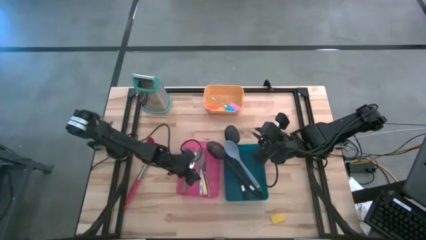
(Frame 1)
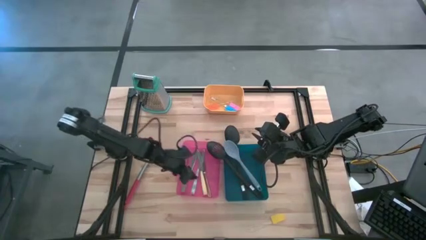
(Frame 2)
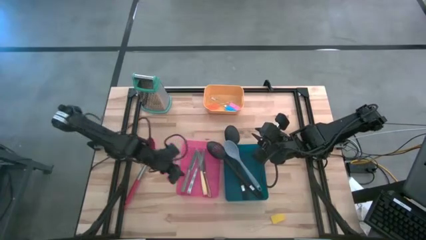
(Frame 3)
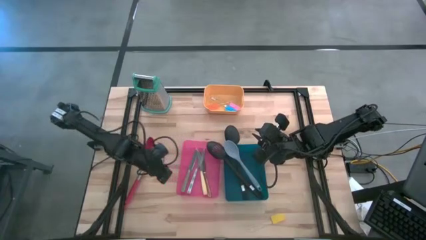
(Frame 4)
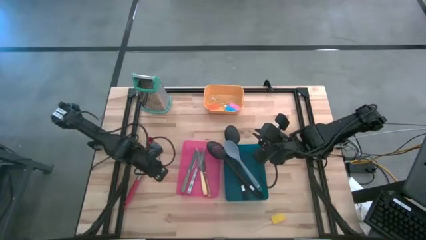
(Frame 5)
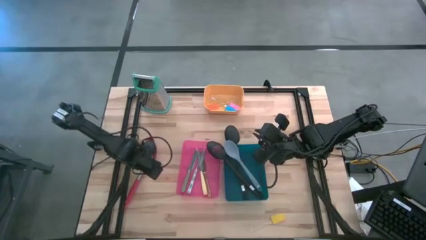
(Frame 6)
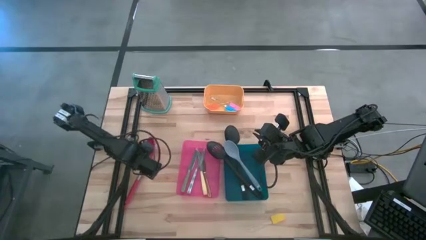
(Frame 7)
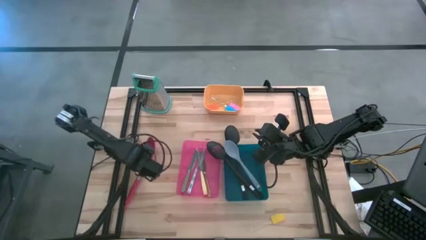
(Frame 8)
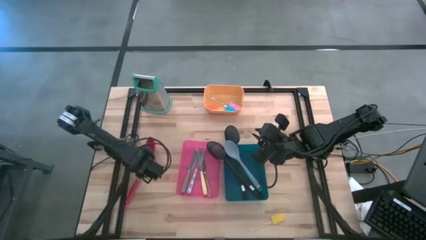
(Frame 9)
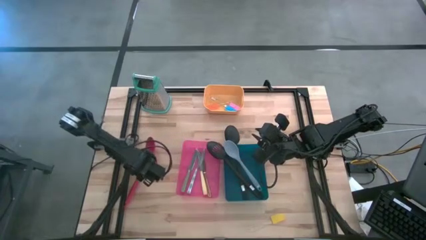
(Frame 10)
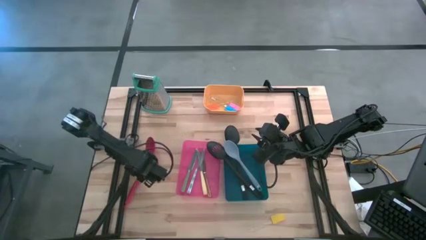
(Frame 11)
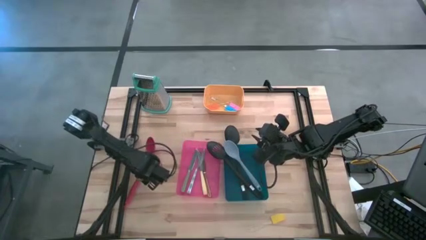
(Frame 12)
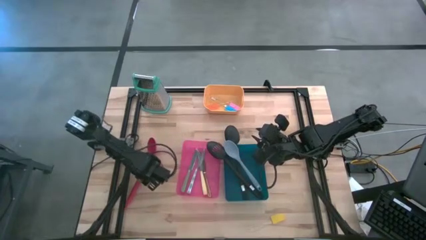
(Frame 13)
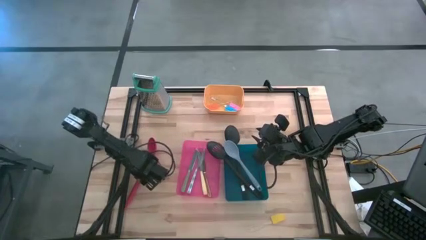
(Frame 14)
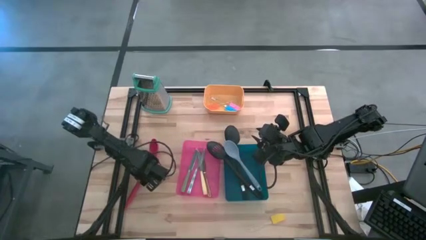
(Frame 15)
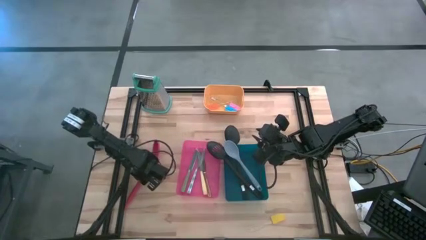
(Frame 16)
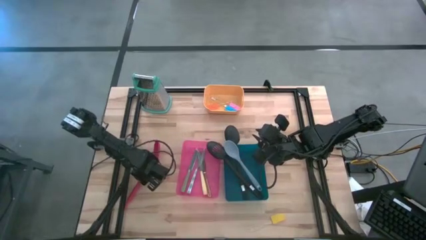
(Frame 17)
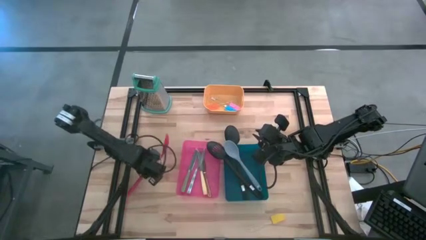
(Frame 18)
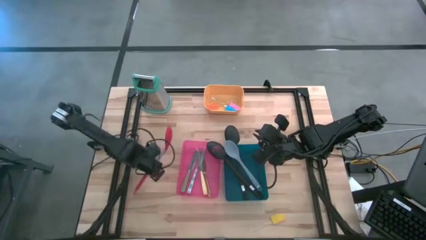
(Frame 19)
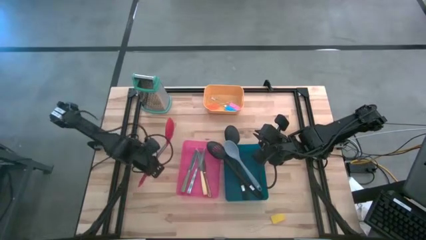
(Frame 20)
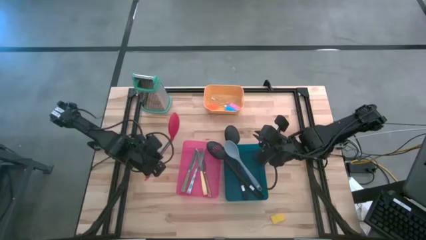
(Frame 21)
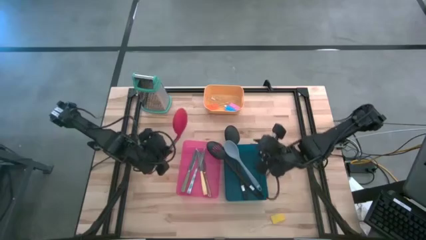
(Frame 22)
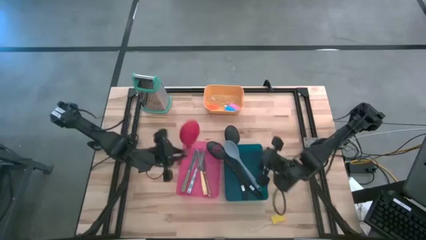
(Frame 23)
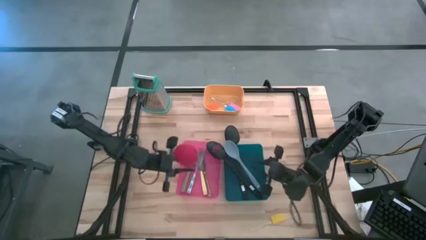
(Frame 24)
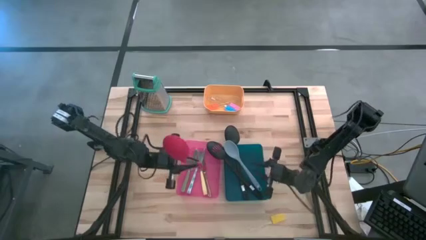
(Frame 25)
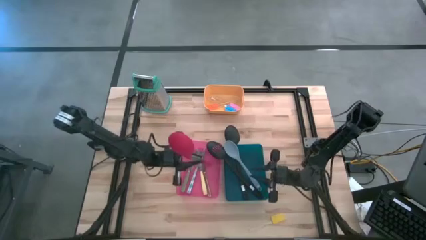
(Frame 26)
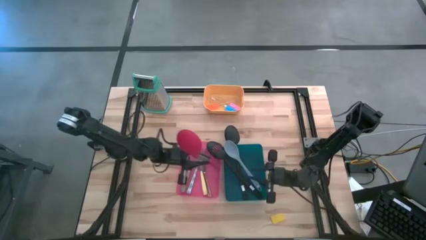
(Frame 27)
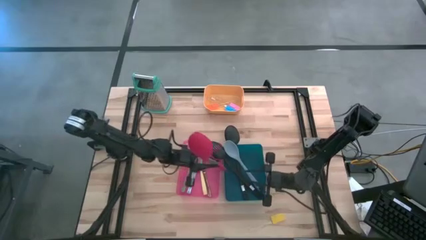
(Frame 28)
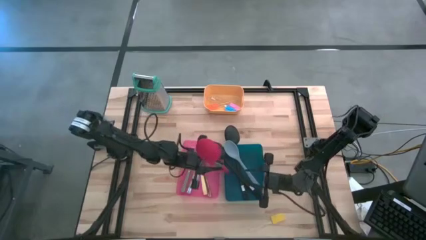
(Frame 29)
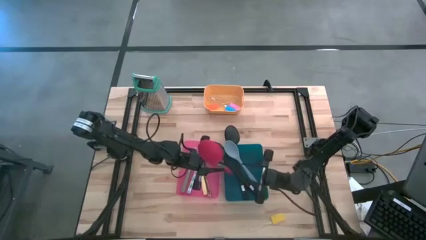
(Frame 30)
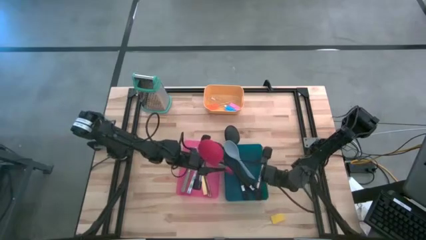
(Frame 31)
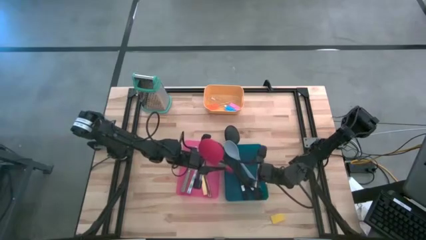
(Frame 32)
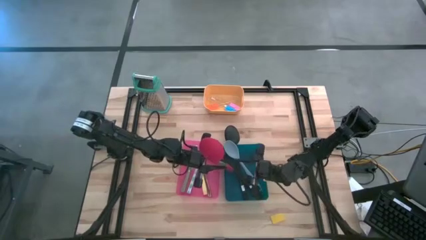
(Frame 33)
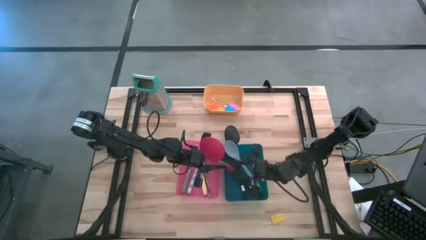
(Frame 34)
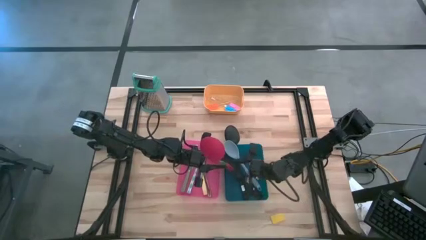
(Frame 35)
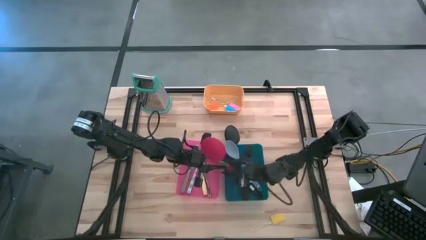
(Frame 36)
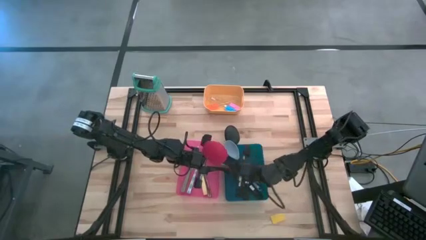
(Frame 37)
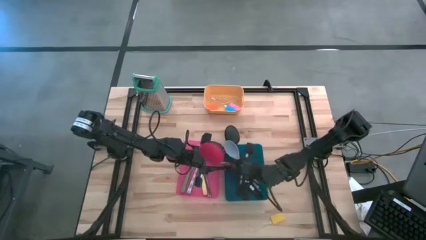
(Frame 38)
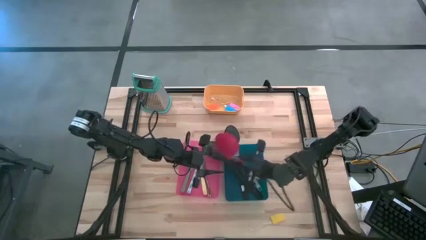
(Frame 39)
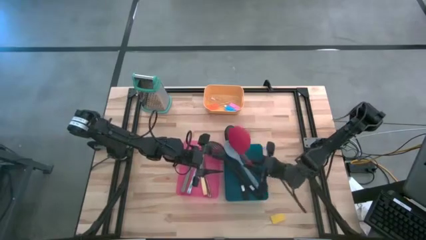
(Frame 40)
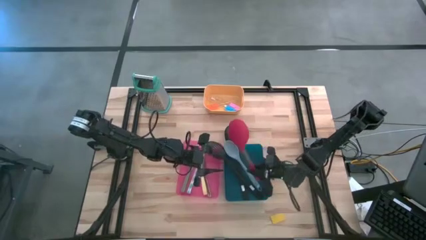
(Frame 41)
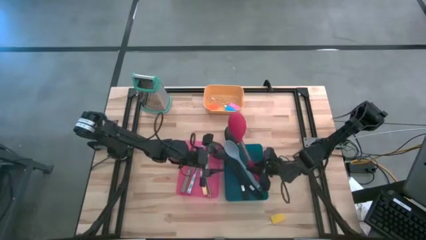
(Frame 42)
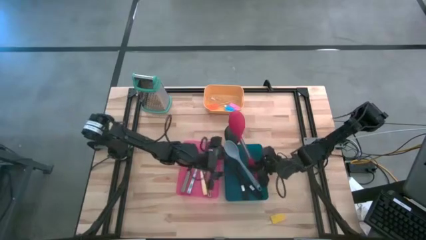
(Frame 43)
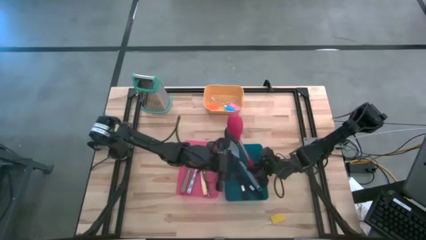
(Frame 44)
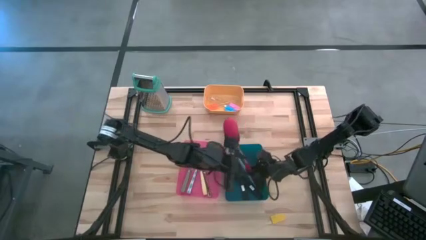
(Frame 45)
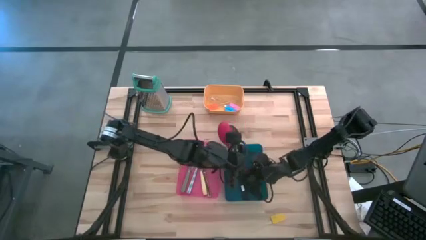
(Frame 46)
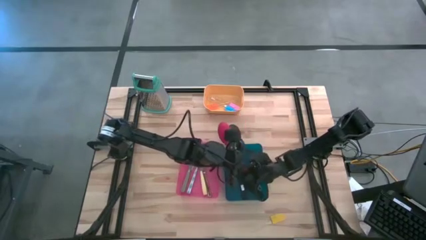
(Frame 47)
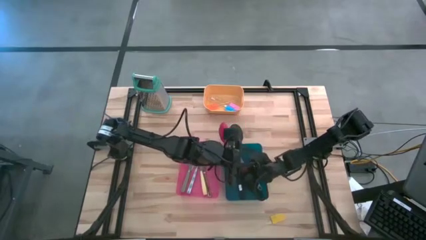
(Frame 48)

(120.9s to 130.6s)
Task: Pick & Place Kitchen Items
Put the orange spoon into the blue bin

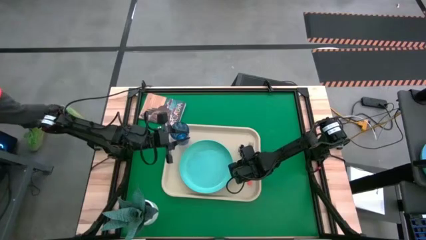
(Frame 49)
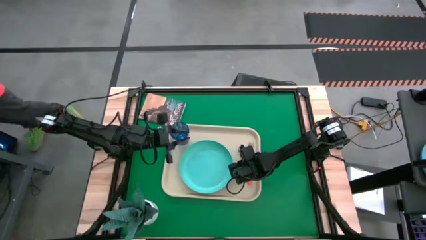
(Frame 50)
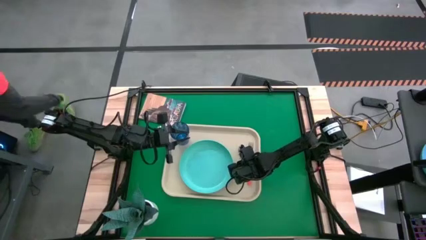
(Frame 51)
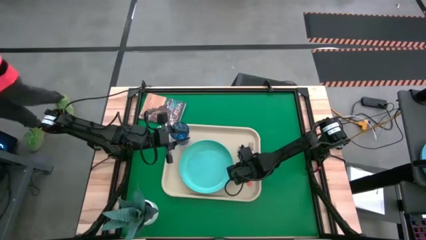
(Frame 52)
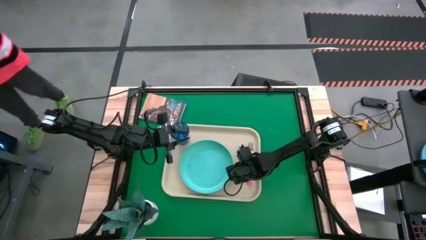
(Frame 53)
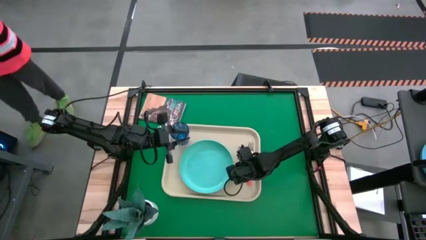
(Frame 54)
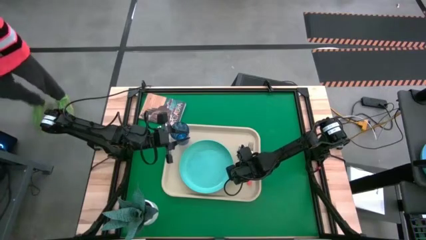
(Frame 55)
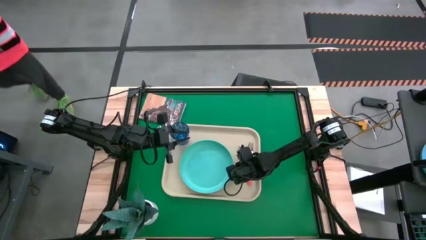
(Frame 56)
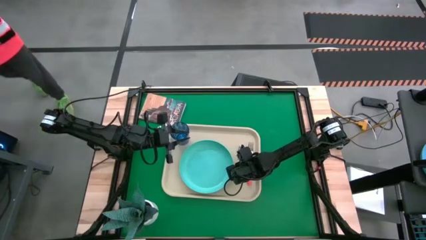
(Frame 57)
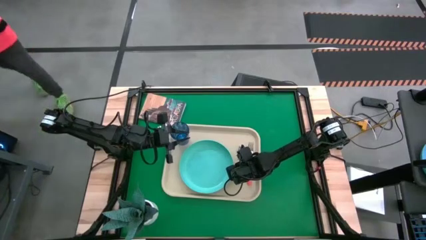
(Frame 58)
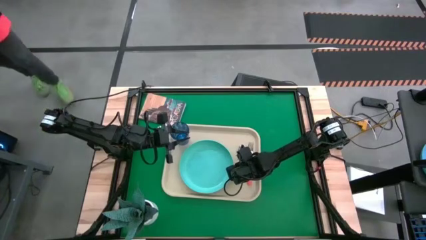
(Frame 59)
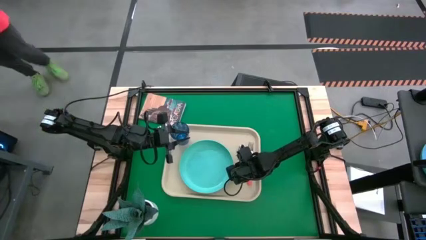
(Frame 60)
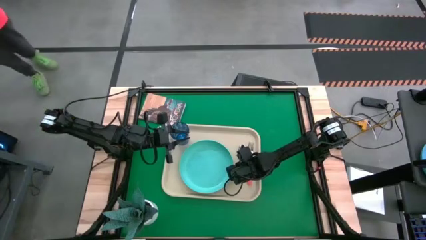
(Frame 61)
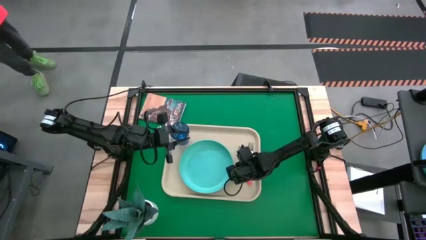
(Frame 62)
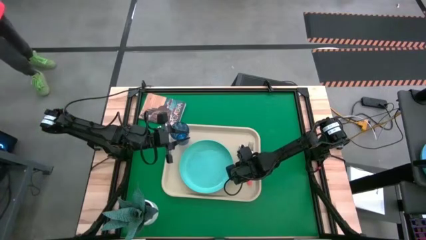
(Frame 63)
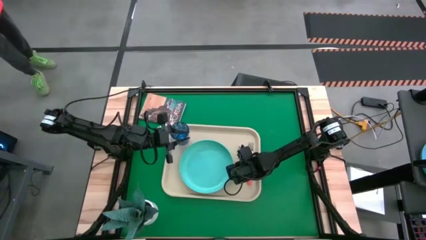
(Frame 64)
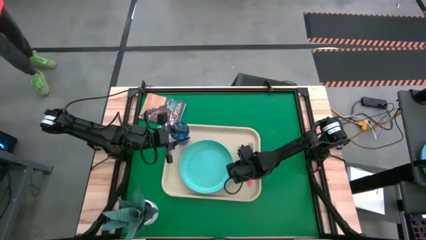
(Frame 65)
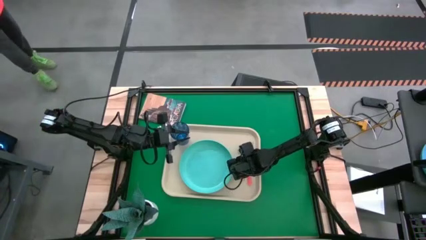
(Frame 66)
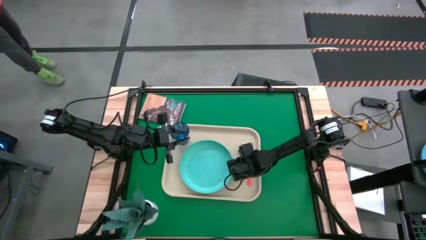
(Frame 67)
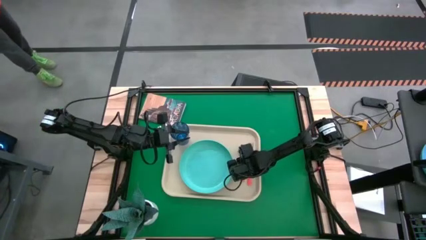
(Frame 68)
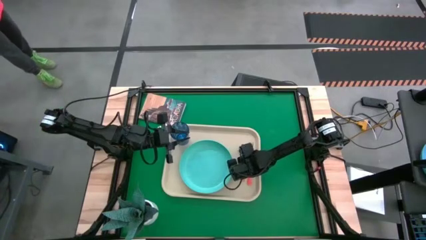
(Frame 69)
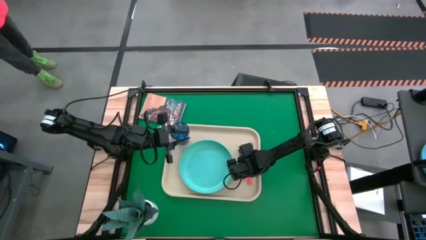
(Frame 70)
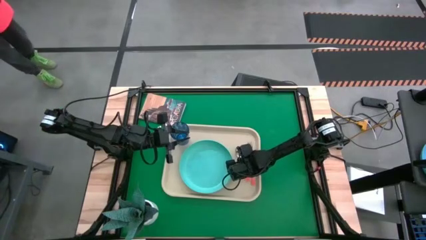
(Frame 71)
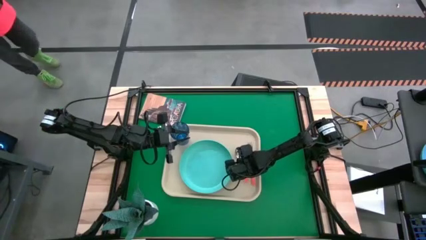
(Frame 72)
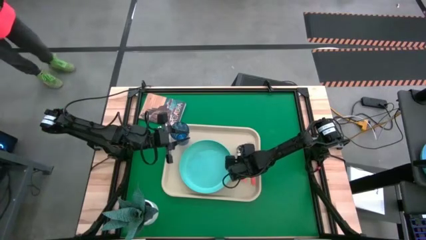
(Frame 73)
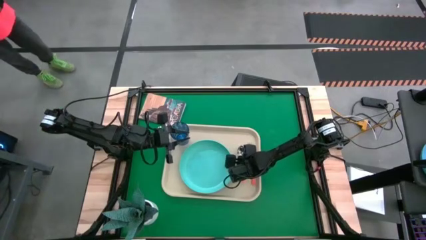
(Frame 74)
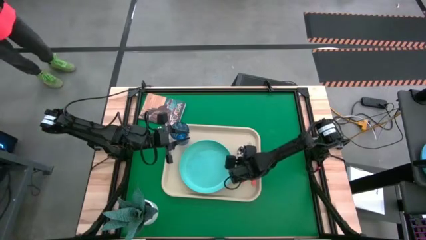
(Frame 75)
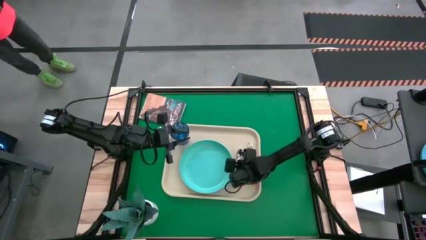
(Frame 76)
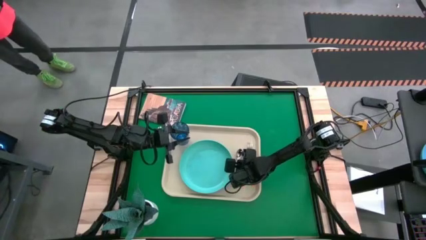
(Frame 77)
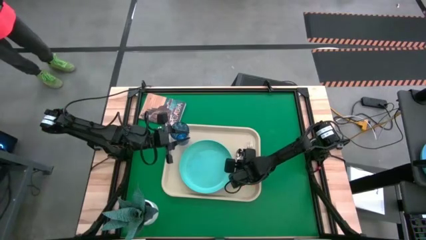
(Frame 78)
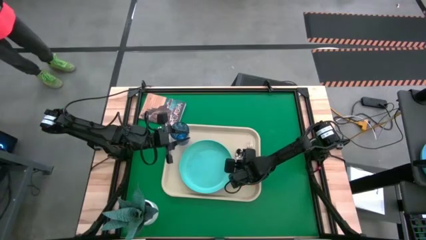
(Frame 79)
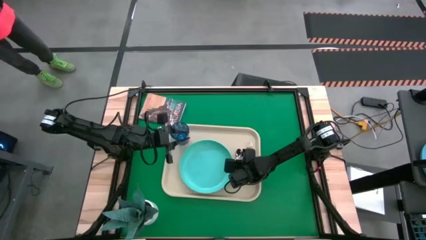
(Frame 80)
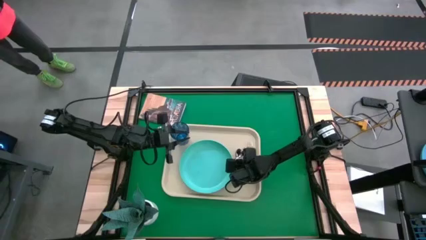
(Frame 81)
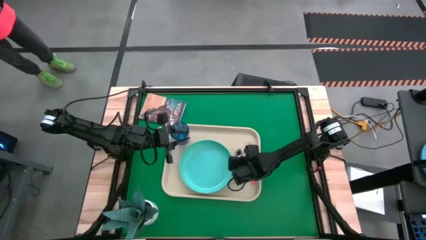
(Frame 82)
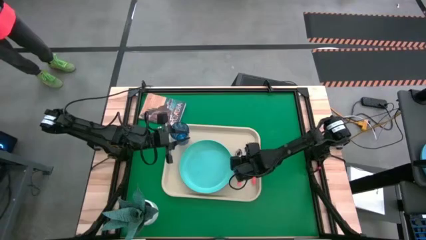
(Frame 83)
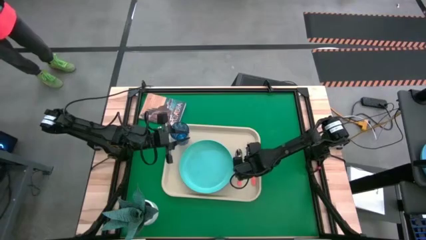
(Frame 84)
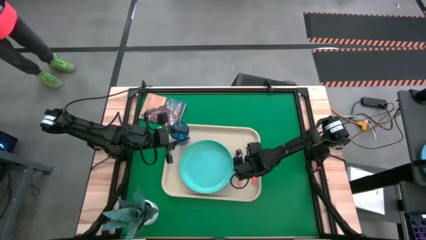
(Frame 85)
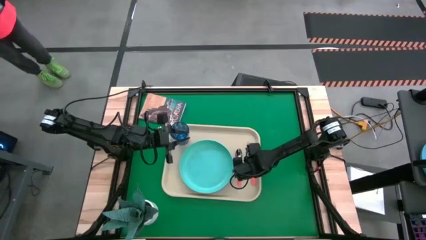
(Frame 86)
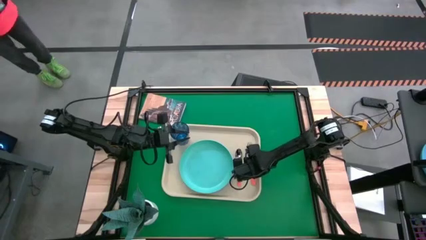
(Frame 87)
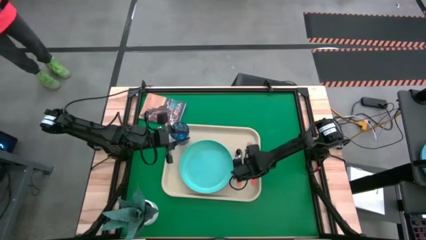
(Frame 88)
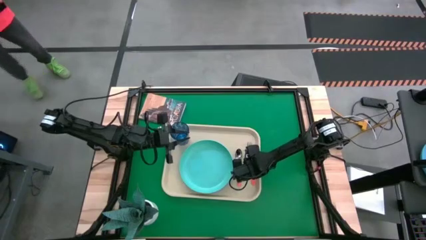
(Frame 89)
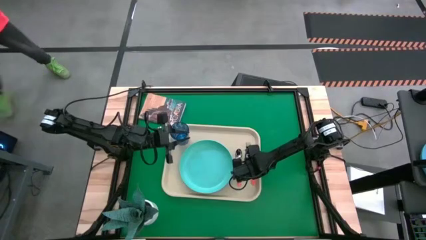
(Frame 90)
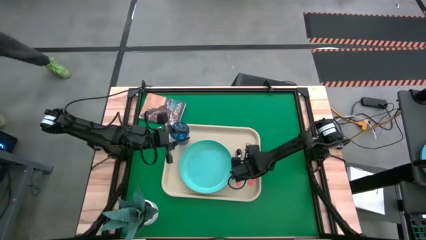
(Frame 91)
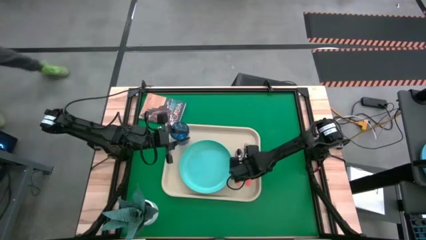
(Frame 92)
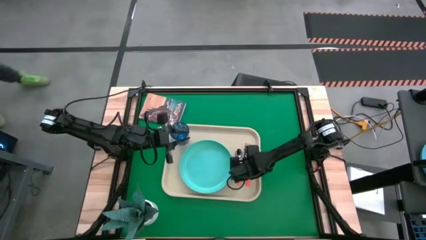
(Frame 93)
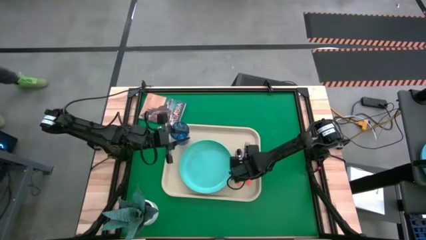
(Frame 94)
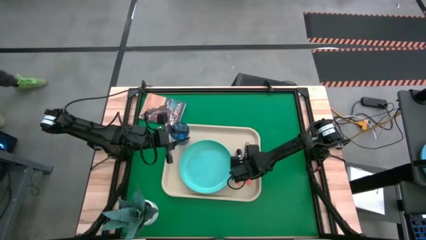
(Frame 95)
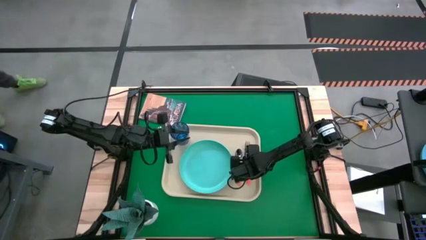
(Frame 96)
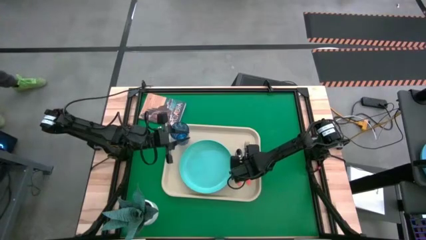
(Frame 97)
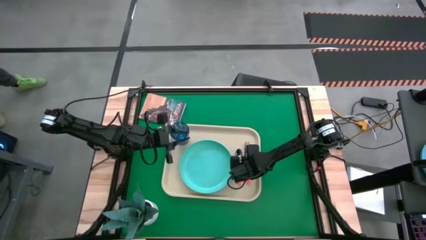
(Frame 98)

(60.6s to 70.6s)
Task: Pick and place plate/cup/fork/spoon on tray
Adjust the utensils on the white tray
